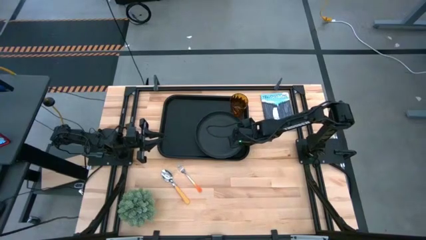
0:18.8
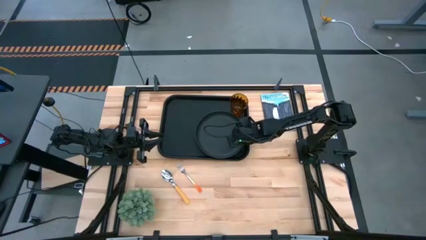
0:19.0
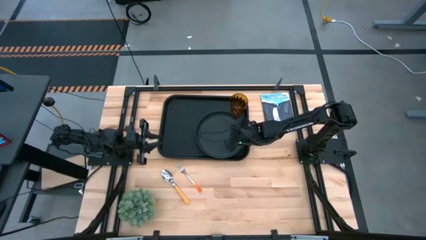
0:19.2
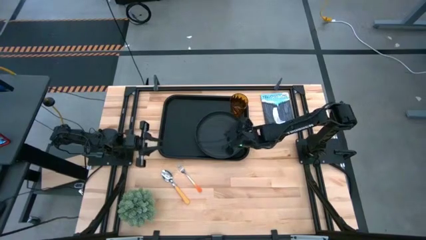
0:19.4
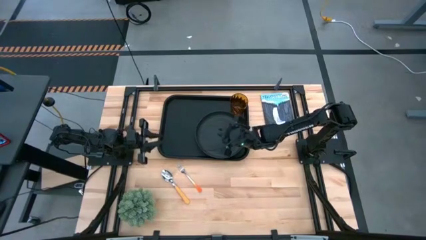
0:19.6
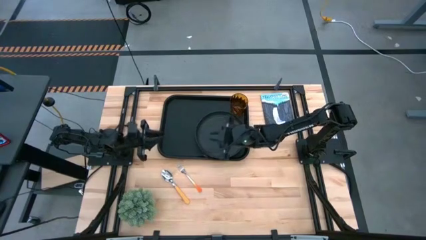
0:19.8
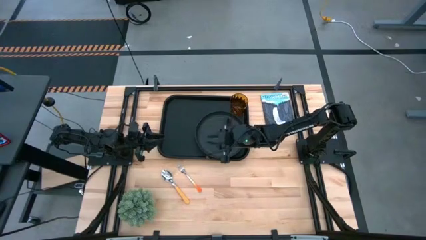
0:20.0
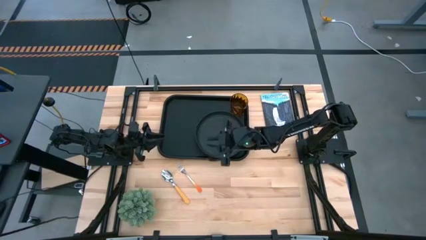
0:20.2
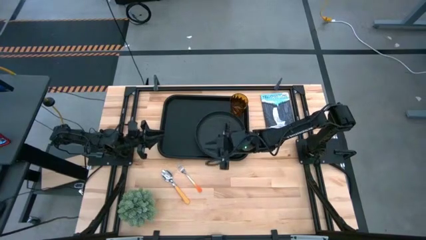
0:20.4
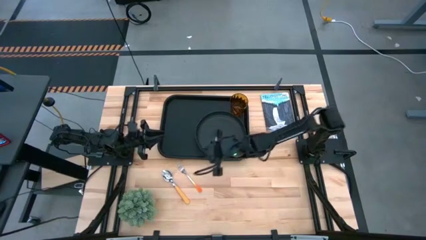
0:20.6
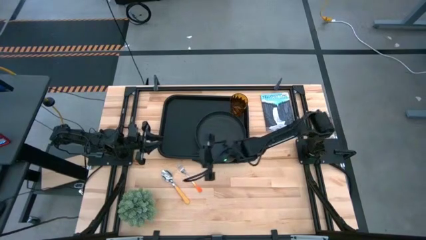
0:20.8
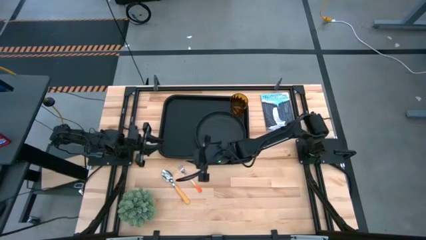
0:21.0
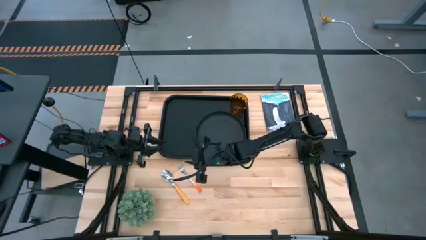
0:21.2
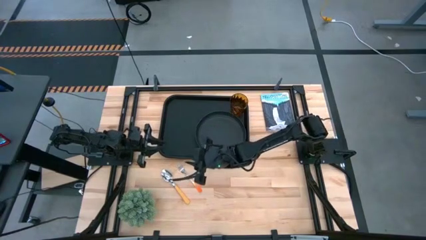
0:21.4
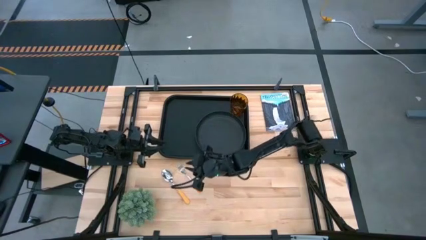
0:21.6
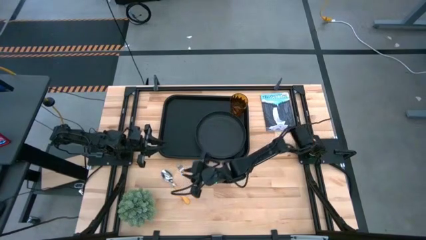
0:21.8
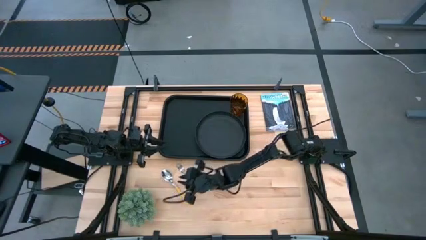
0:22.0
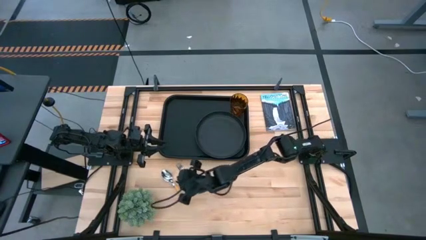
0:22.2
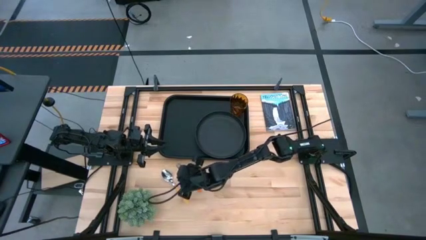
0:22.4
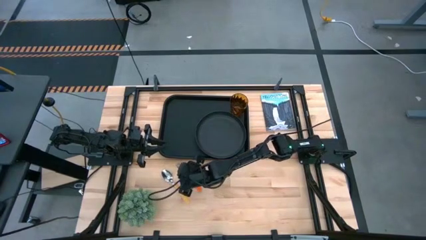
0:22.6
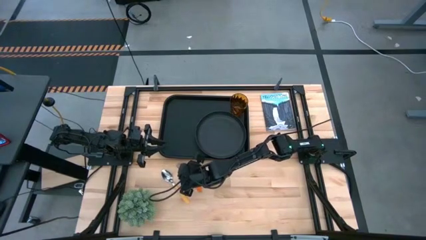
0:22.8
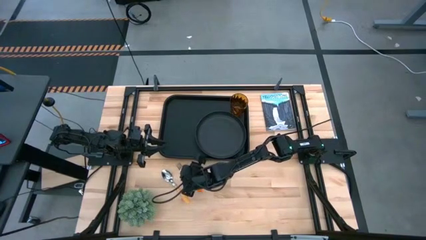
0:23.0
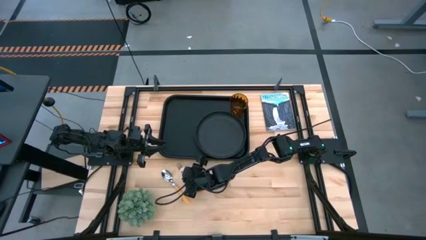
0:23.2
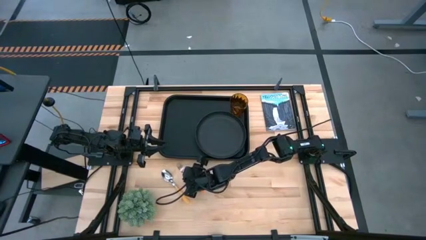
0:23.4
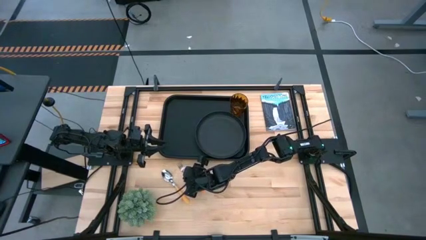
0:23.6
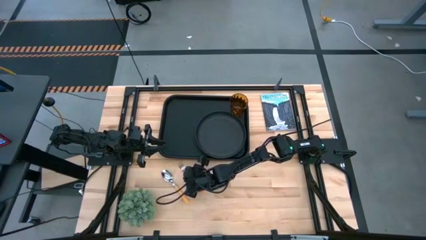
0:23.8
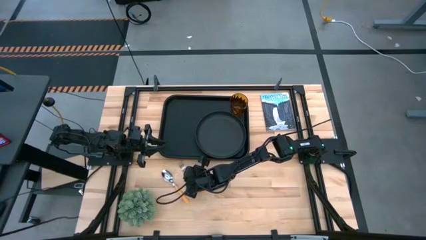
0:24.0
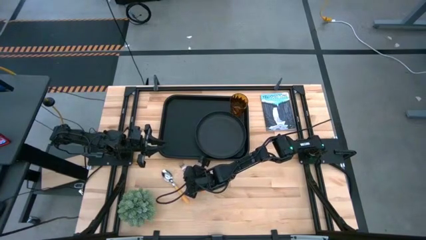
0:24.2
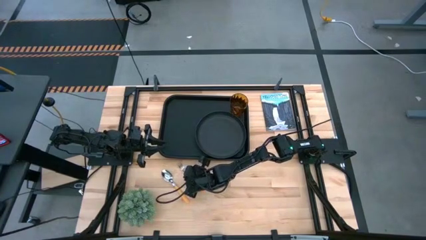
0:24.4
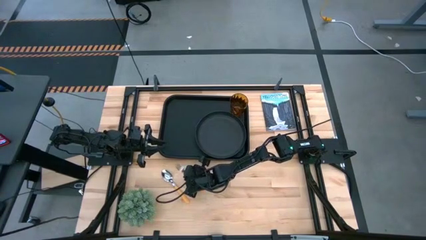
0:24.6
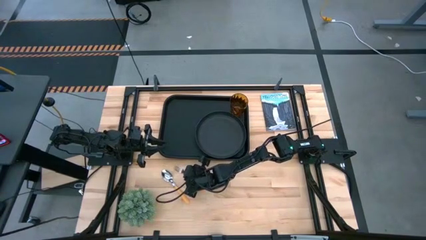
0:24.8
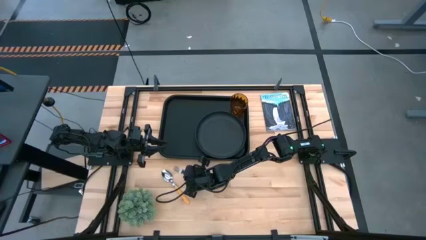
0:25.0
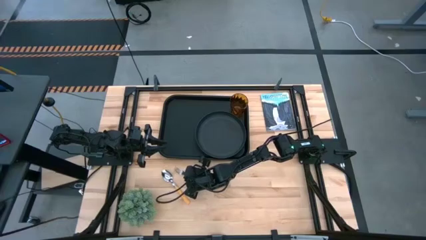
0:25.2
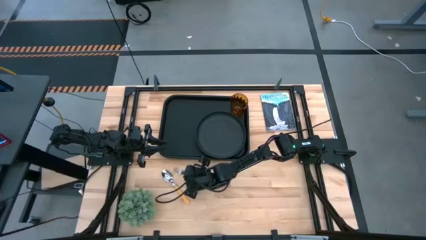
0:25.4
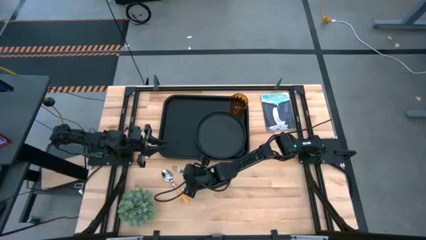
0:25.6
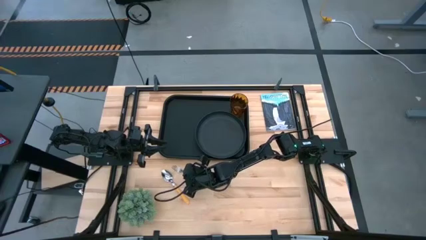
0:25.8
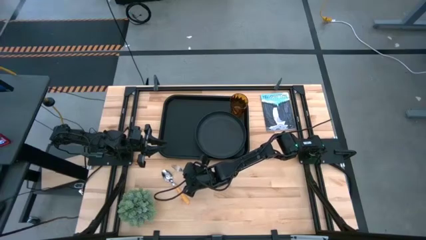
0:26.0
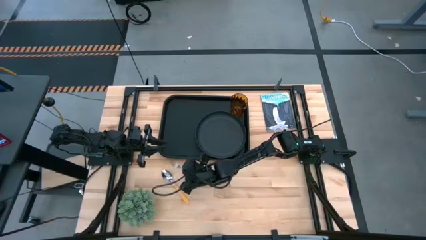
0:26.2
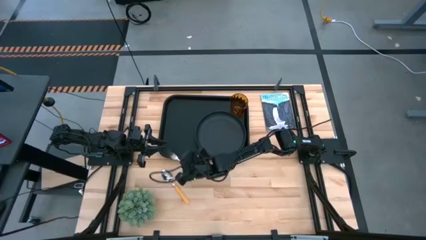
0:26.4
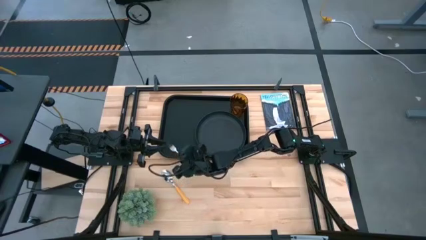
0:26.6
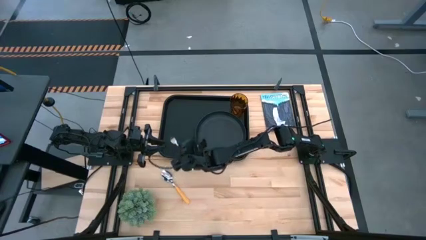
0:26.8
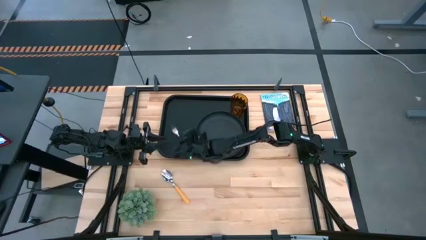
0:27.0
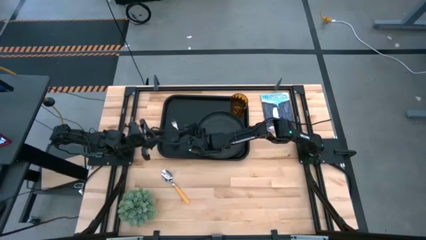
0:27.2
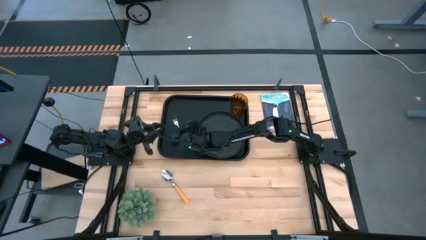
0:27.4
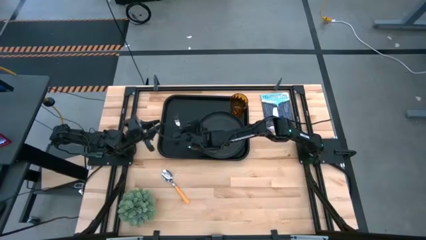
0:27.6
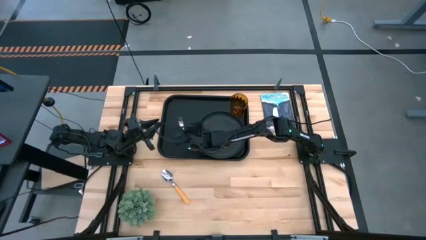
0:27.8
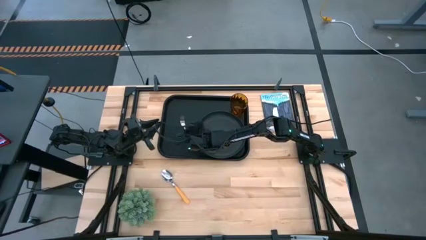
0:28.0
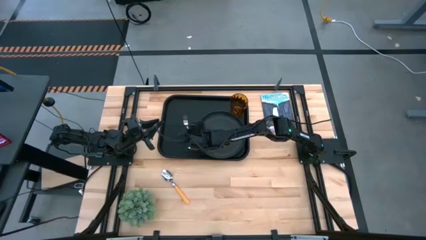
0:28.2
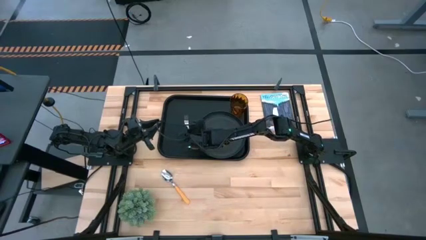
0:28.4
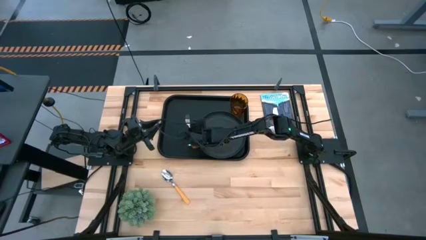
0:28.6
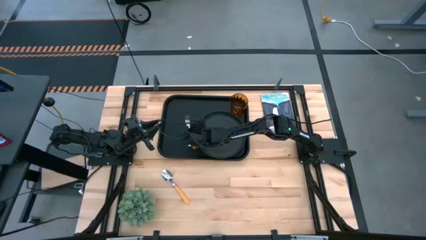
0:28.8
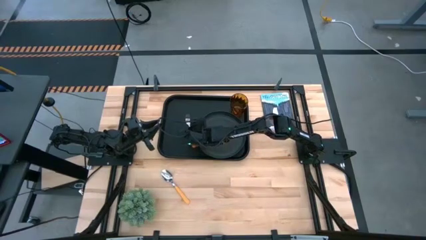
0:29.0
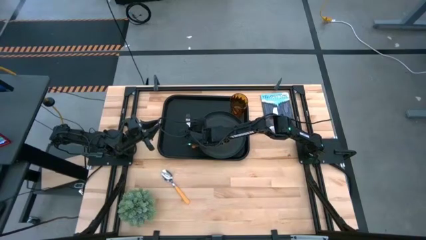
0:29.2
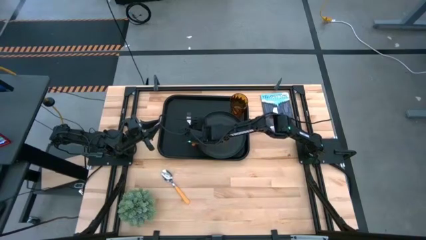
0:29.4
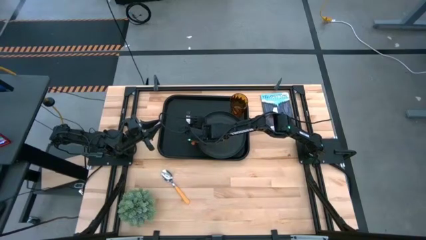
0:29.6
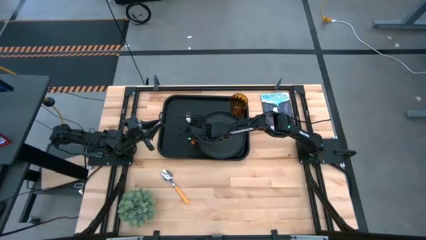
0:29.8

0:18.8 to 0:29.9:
Task: Pick and place plate/cup/fork/spoon on tray
Put the orange fork on the black tray on the left side of the black plate
